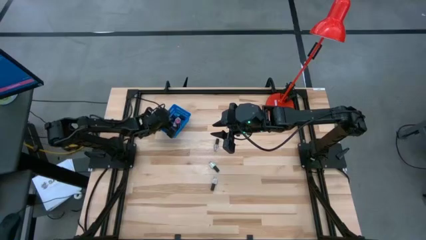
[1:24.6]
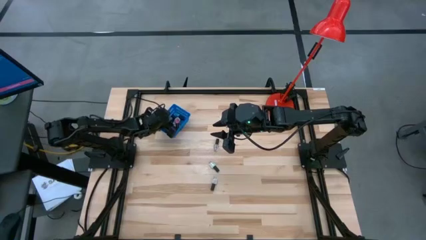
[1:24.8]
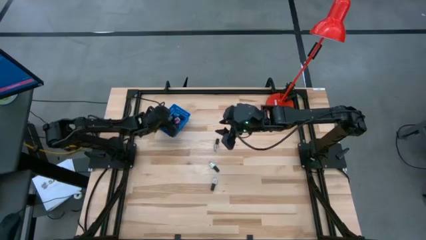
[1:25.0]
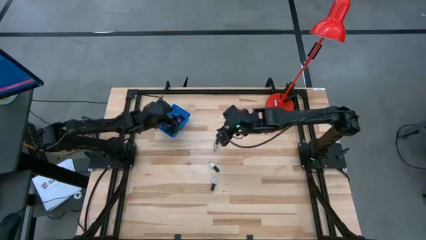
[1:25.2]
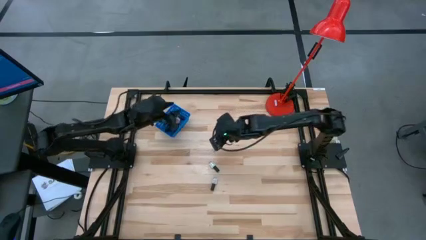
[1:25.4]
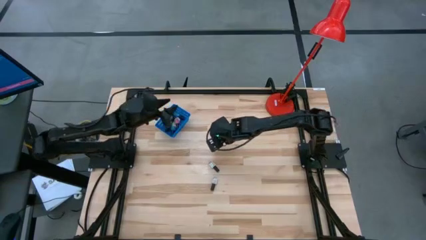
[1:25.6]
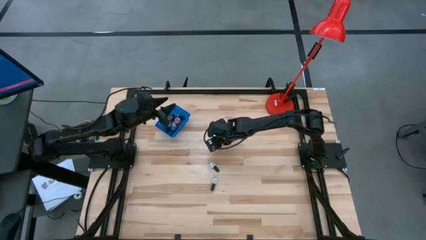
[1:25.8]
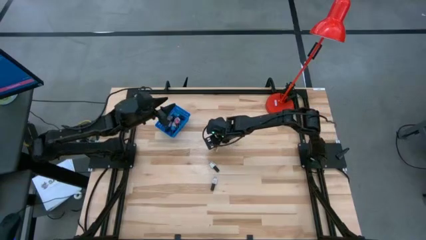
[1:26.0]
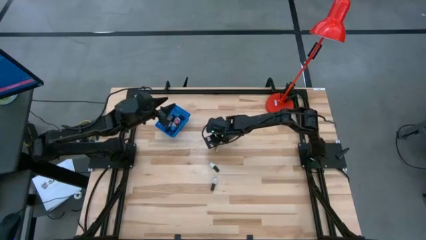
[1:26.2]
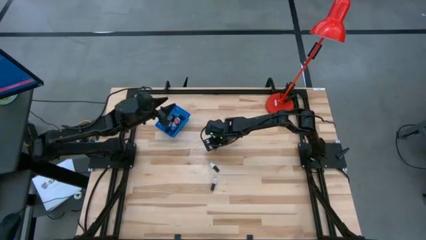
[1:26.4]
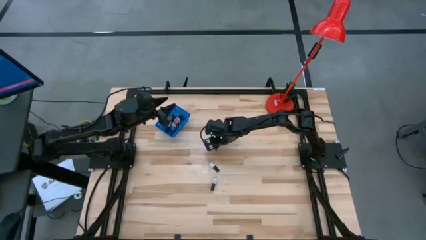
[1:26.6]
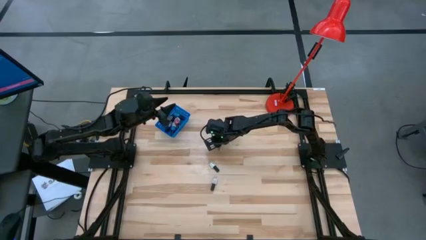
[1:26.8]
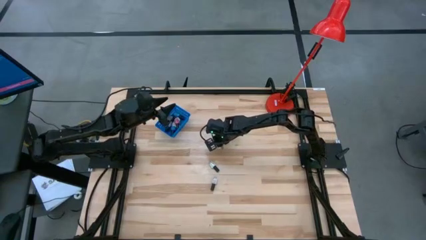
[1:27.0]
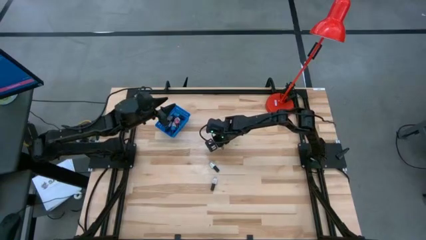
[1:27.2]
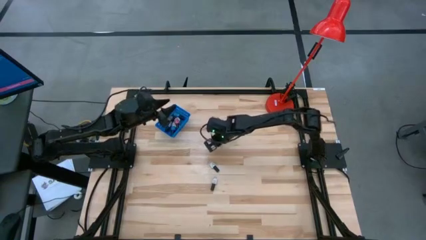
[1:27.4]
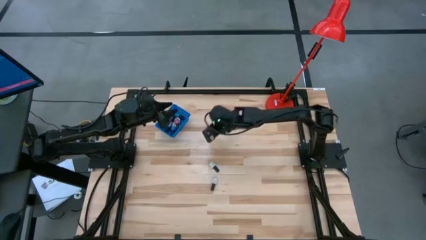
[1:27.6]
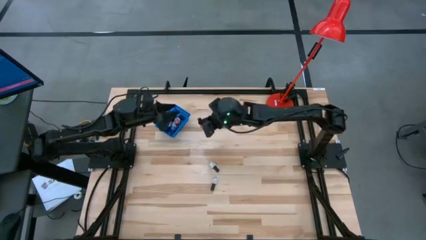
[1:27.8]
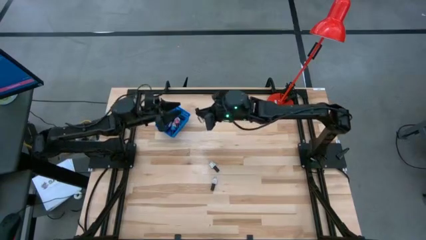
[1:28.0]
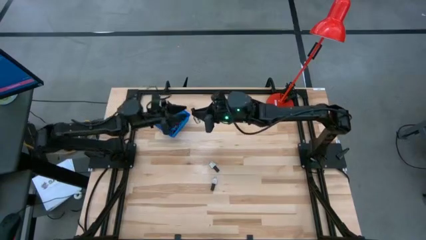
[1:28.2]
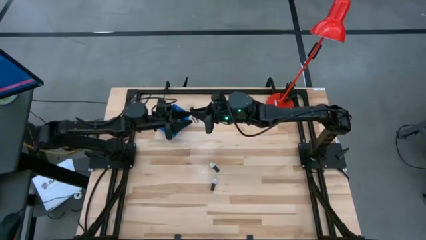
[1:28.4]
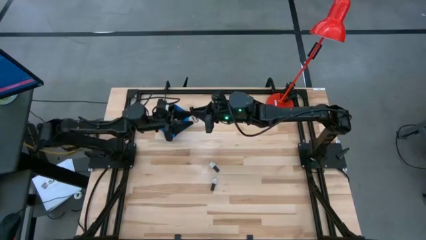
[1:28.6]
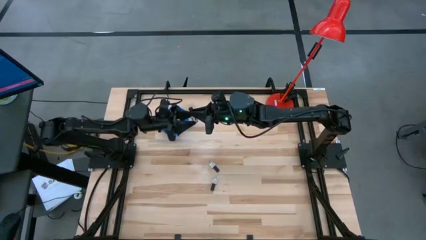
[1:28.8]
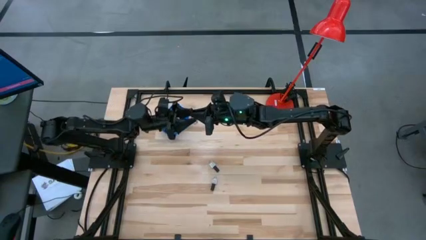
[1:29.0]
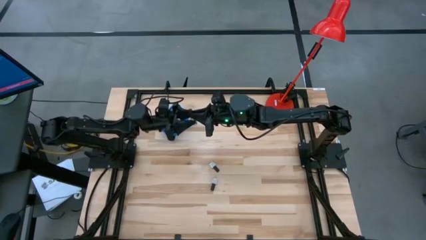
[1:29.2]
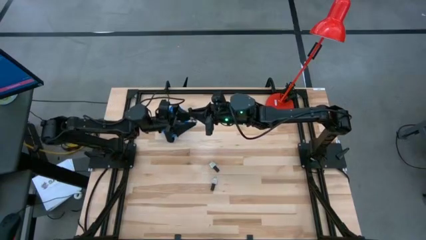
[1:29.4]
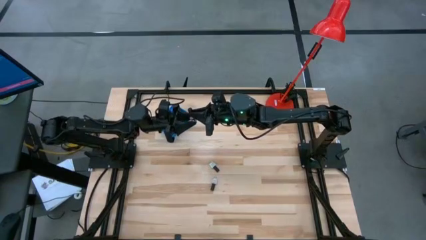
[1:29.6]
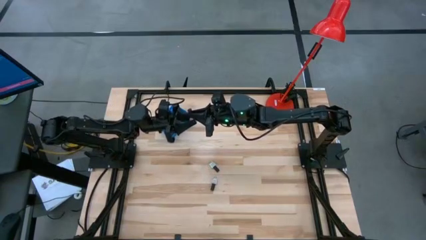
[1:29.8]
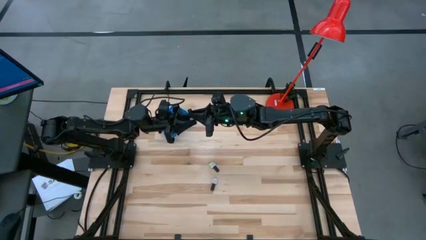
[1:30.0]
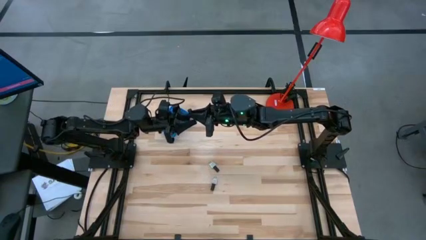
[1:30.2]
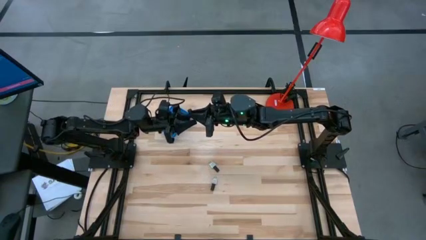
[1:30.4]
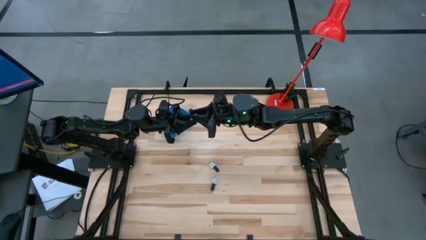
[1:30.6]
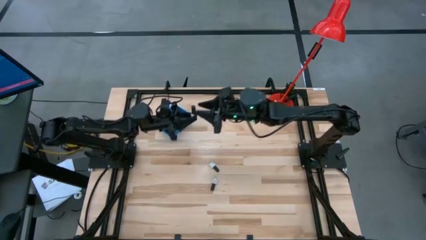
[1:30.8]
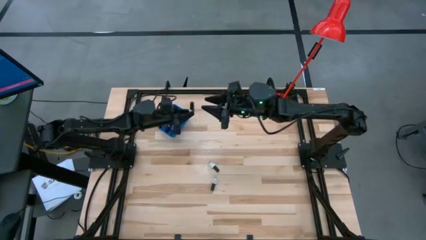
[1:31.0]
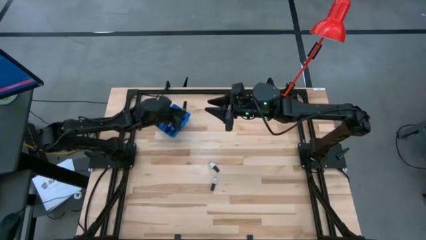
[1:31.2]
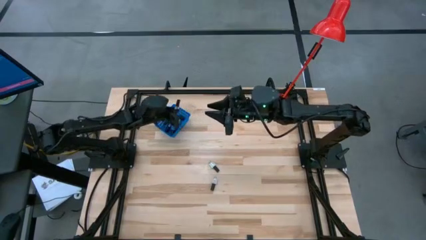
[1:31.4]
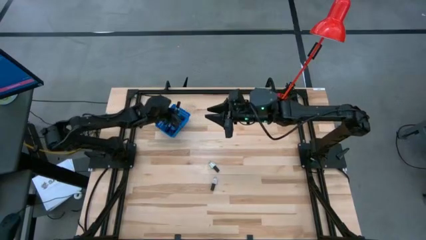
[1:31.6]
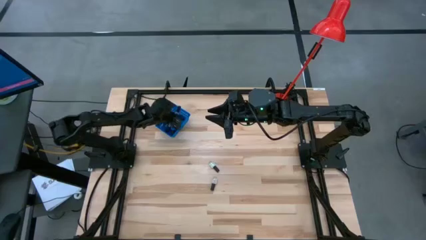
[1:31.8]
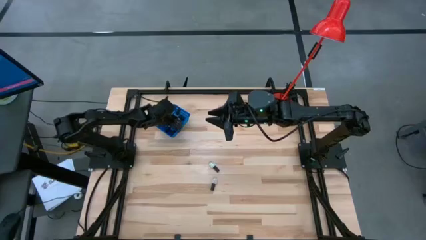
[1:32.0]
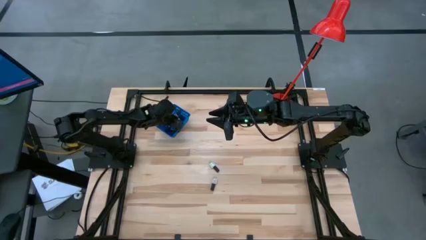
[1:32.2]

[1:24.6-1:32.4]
Task: Pick & Place Nail Polish
Put the transparent nail polish bottle into the blue bin

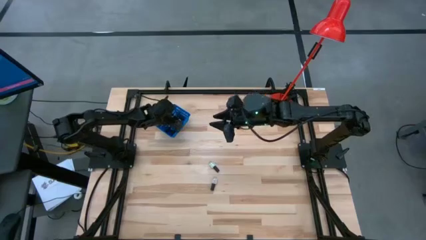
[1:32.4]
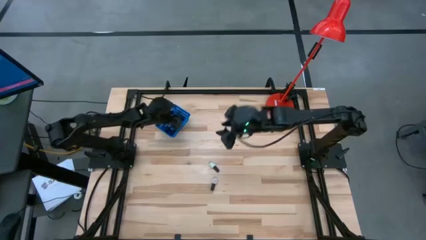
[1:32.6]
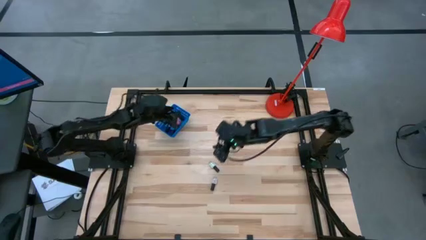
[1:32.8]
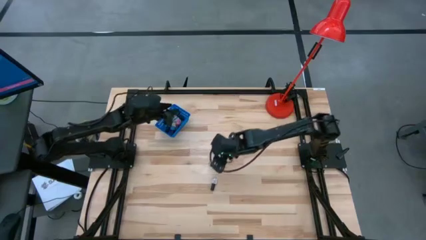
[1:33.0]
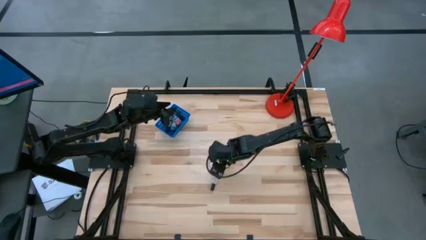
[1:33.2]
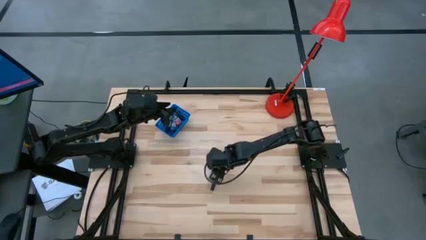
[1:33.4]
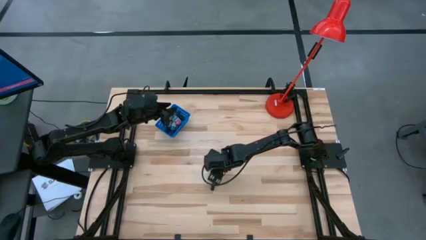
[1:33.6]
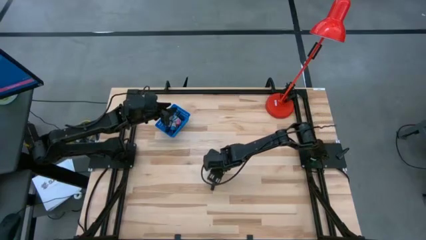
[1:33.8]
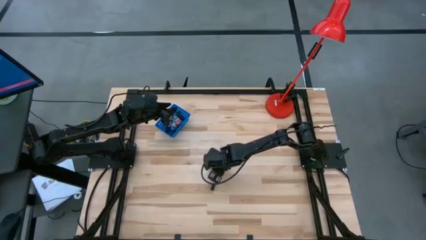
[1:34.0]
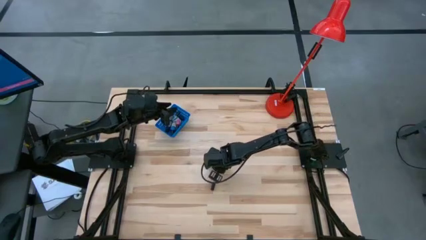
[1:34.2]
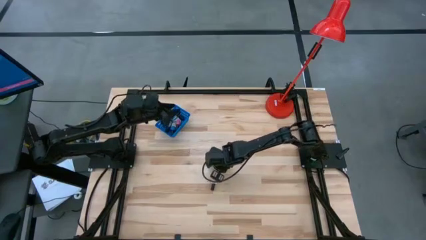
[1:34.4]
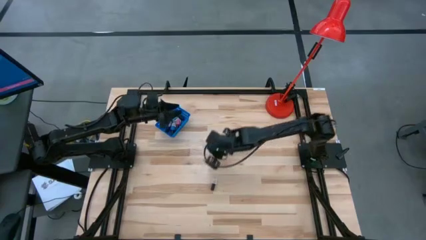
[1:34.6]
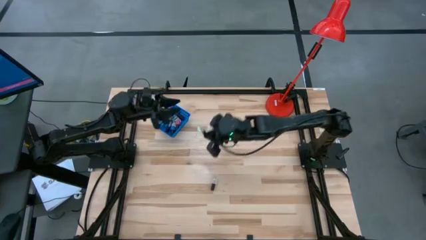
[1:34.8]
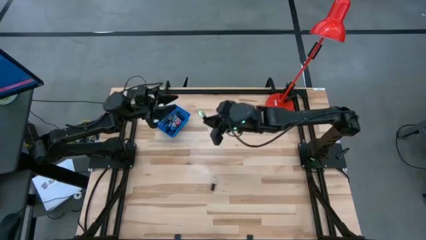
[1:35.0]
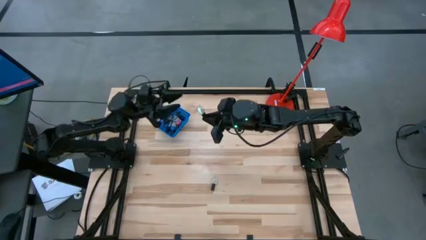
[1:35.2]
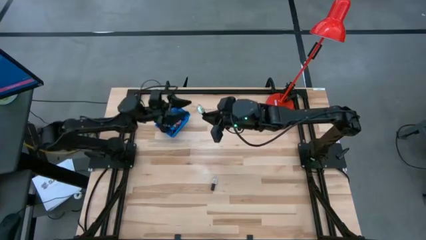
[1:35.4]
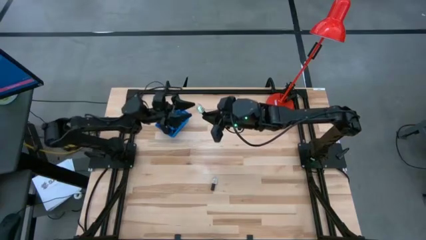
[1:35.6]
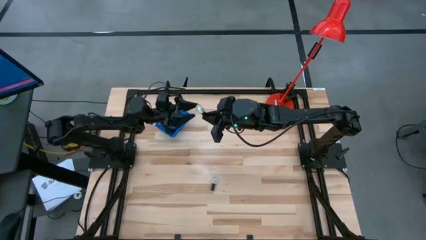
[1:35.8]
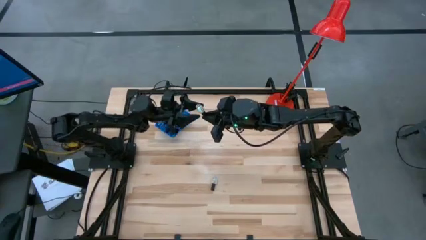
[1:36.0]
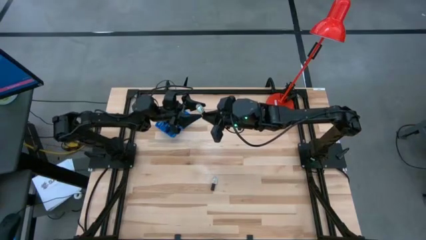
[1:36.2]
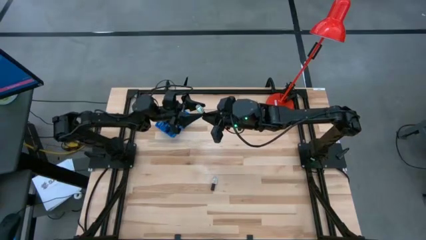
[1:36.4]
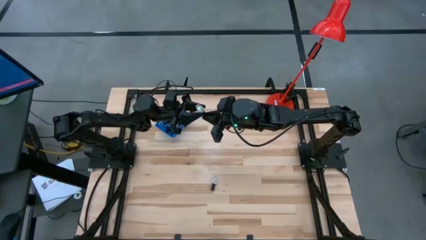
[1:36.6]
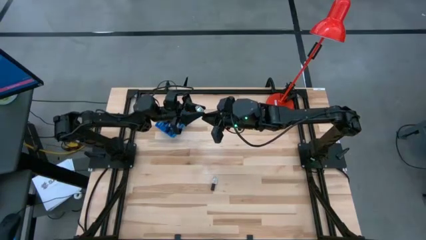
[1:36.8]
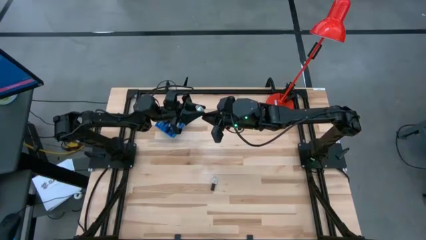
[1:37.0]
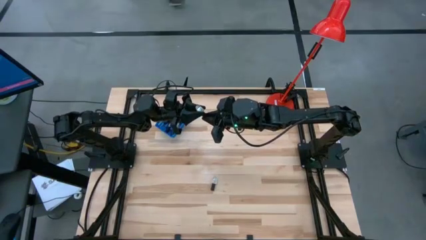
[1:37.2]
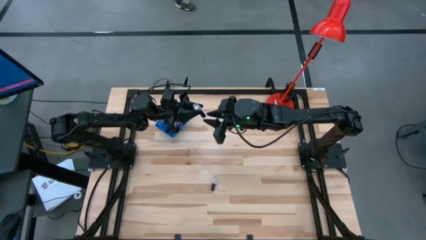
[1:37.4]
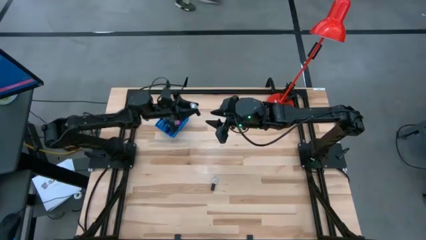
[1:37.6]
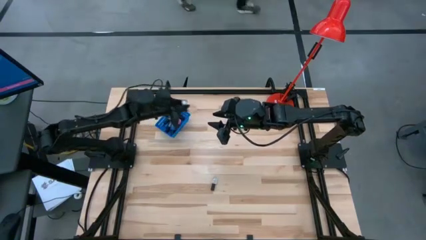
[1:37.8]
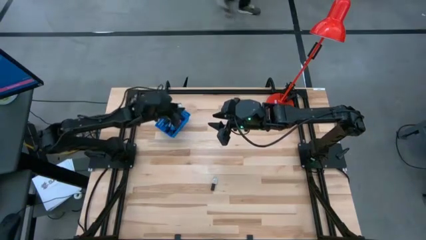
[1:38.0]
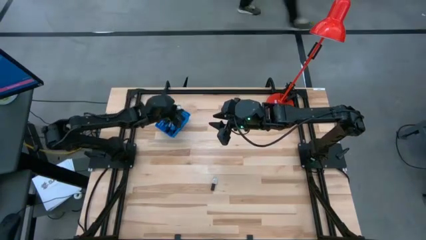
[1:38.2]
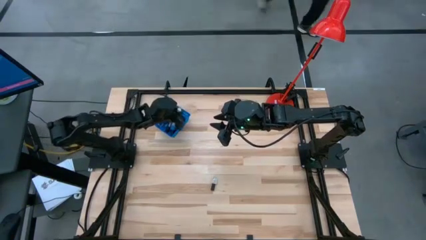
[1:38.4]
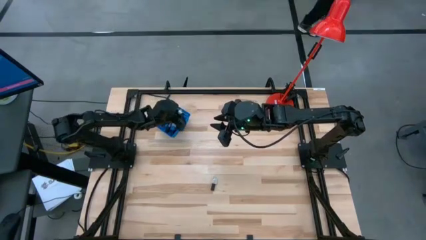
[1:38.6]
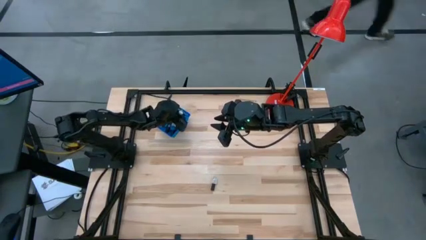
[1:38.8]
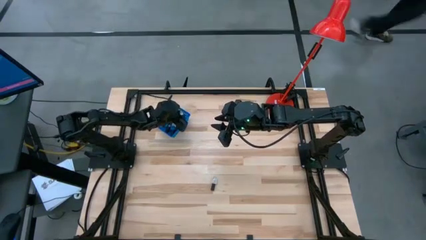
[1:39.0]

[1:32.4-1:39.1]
Put the light green nail polish bottle into the blue bin
